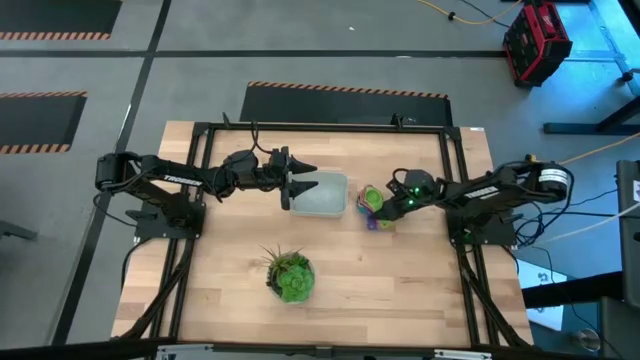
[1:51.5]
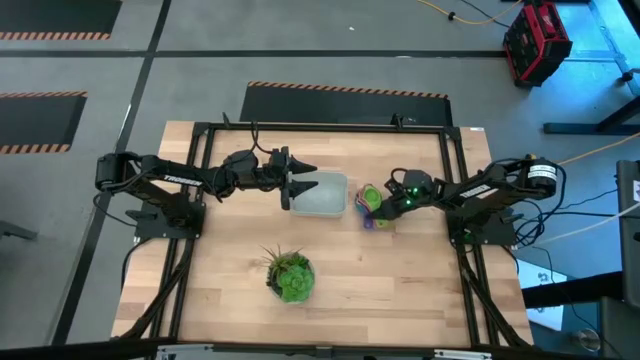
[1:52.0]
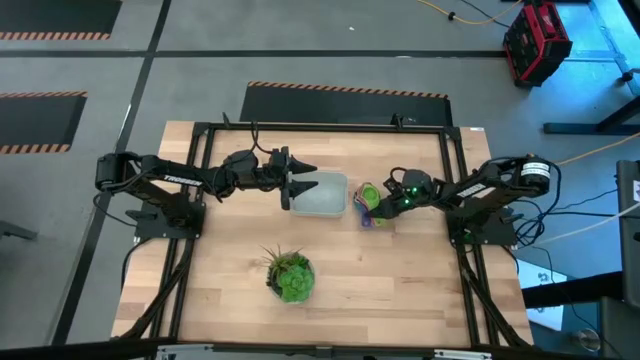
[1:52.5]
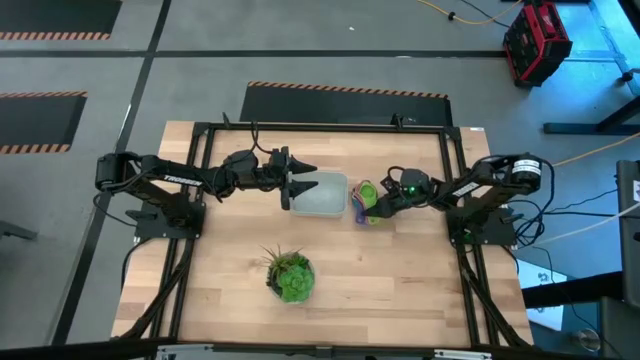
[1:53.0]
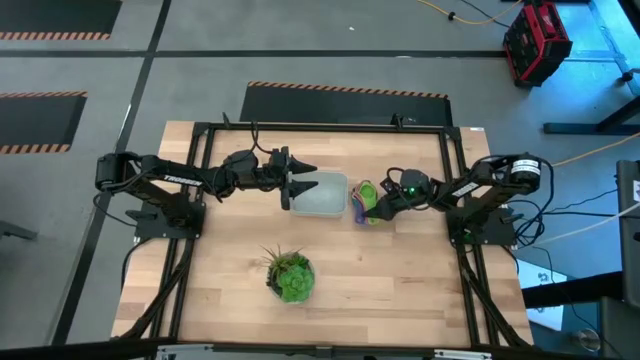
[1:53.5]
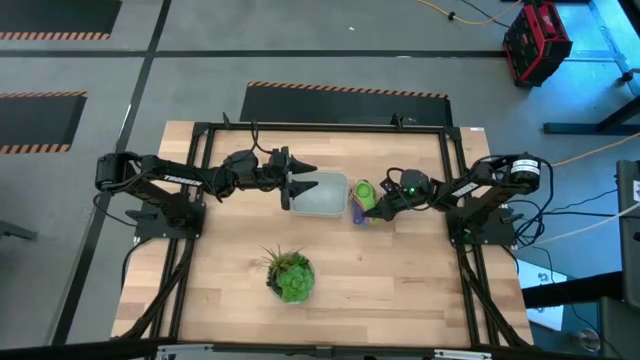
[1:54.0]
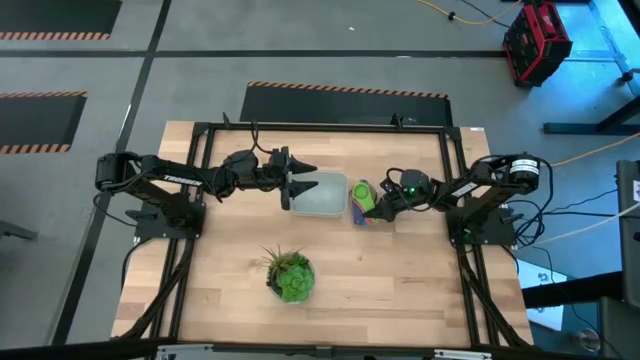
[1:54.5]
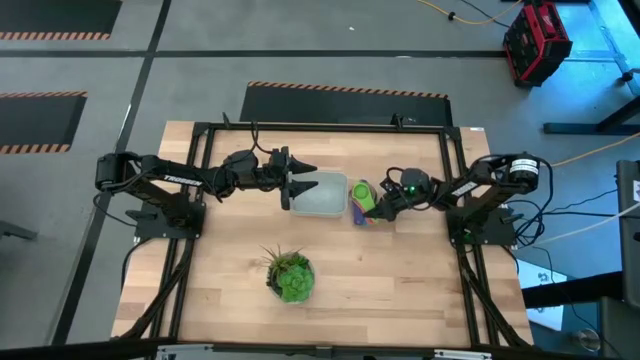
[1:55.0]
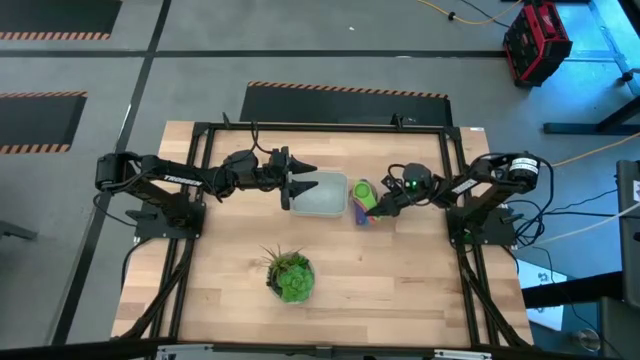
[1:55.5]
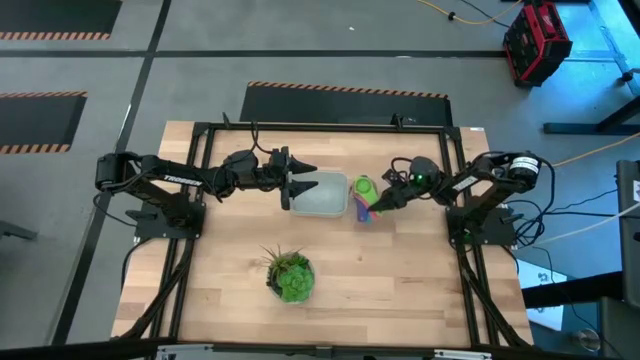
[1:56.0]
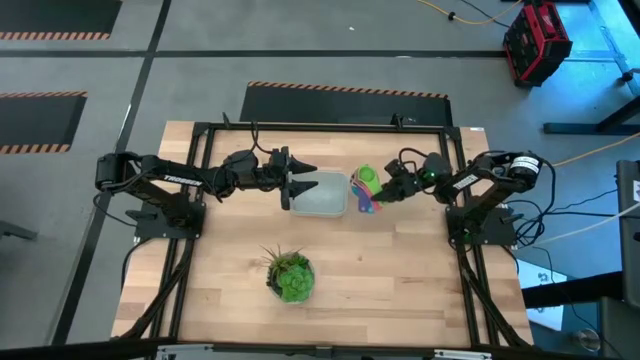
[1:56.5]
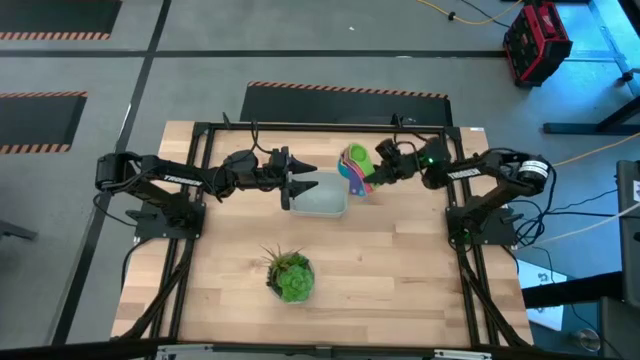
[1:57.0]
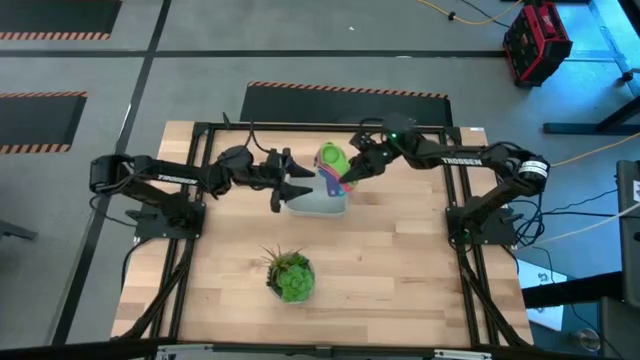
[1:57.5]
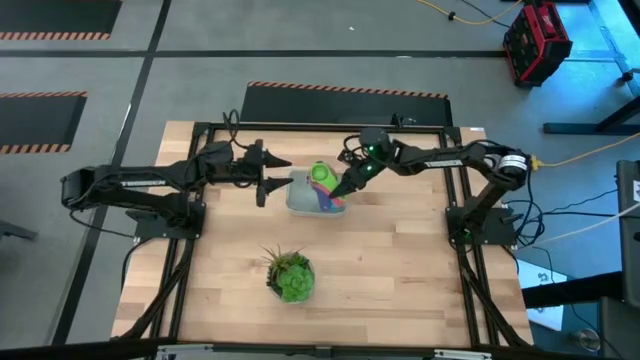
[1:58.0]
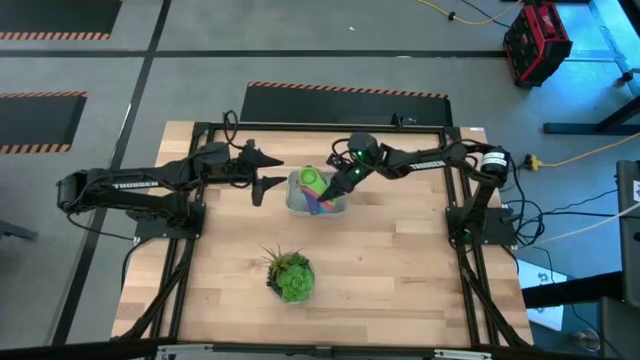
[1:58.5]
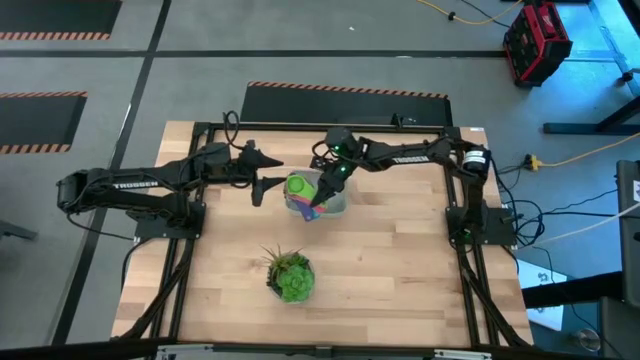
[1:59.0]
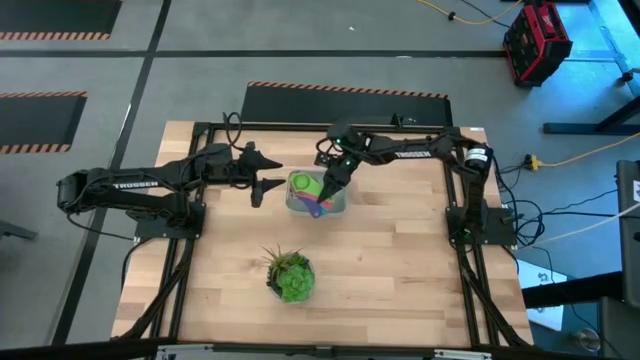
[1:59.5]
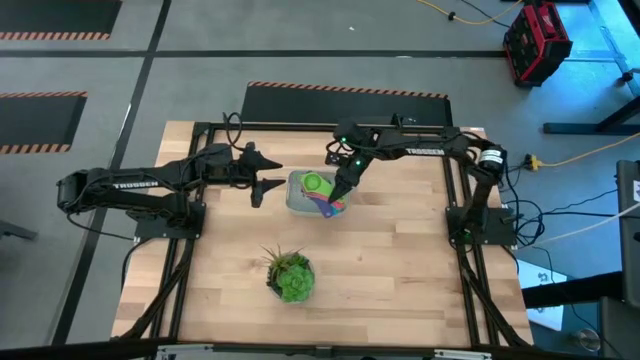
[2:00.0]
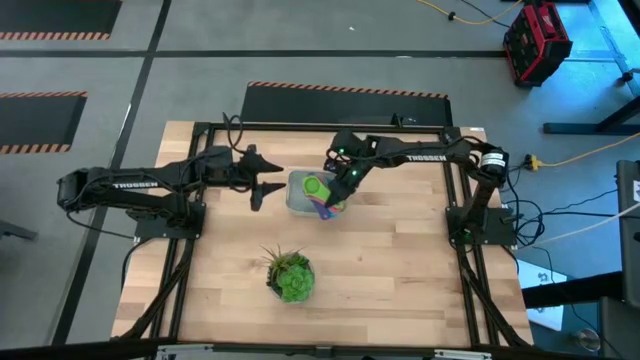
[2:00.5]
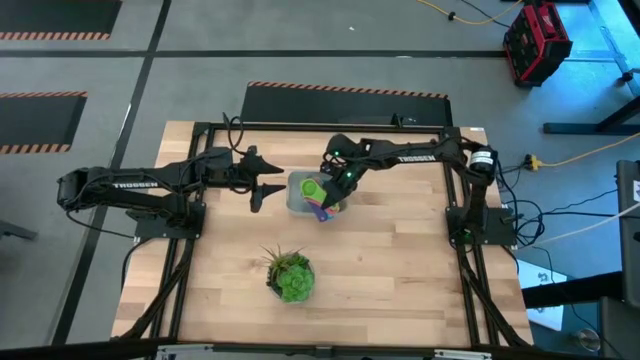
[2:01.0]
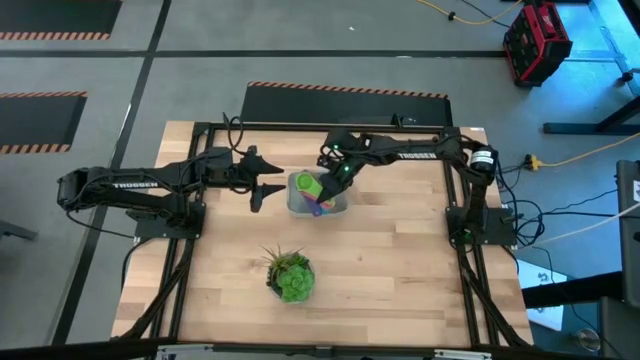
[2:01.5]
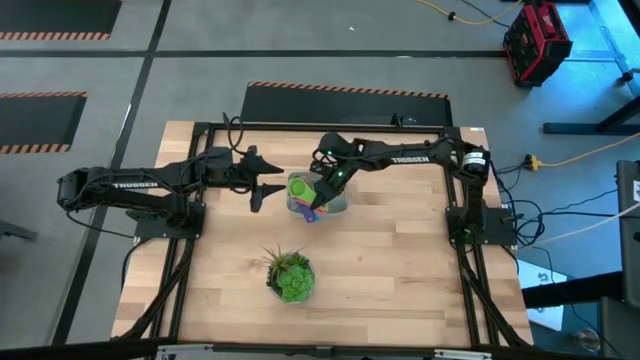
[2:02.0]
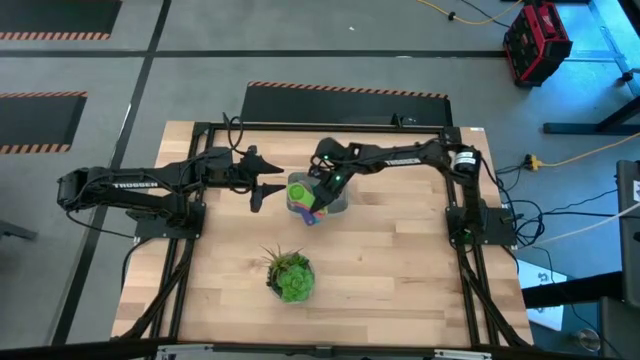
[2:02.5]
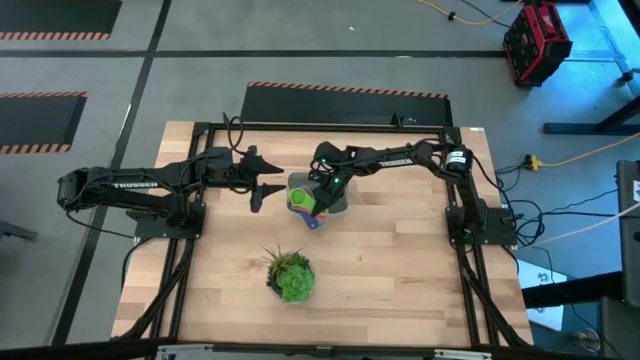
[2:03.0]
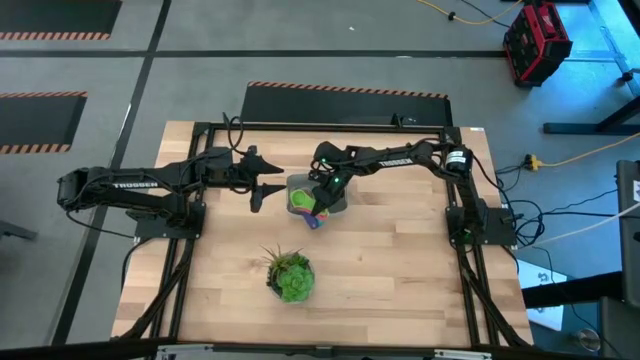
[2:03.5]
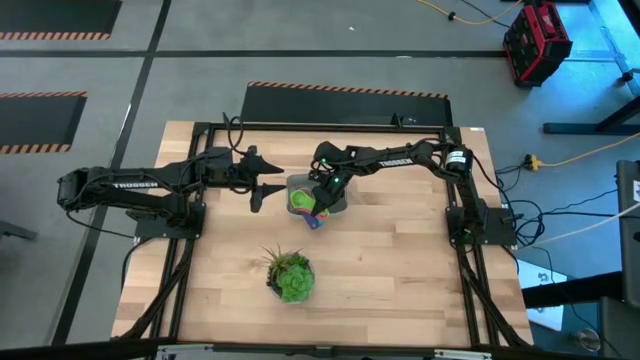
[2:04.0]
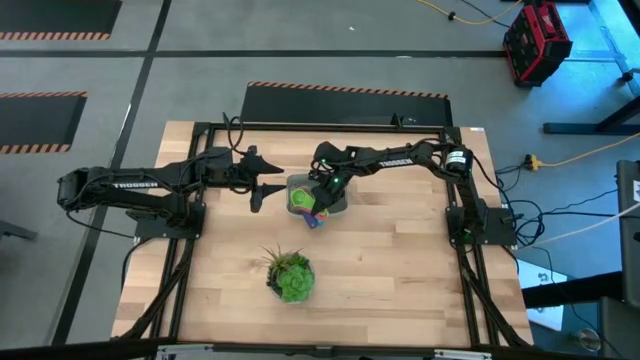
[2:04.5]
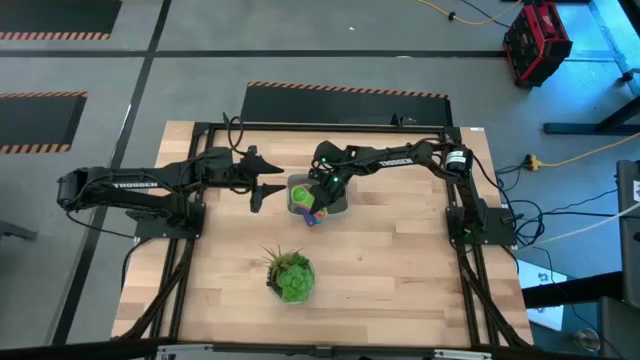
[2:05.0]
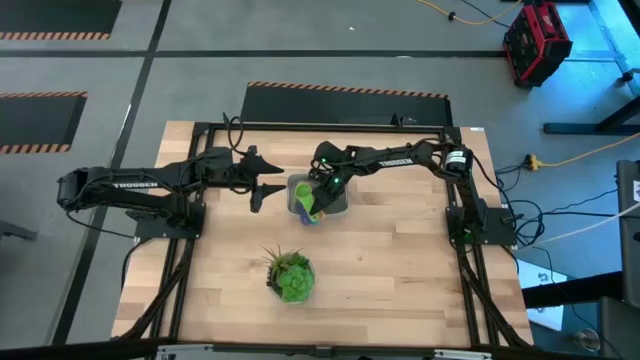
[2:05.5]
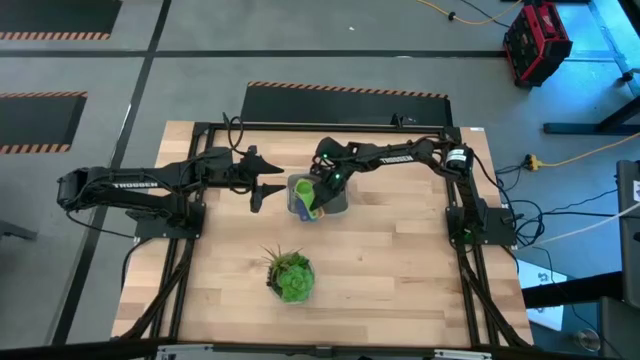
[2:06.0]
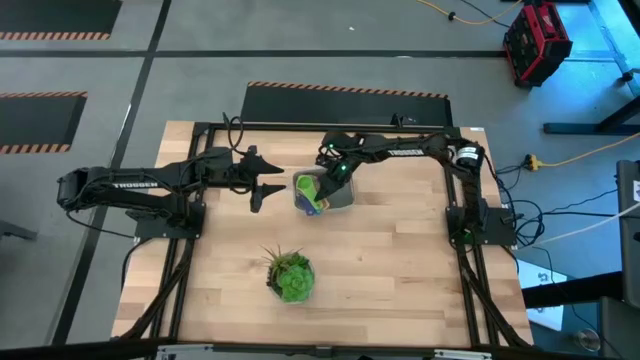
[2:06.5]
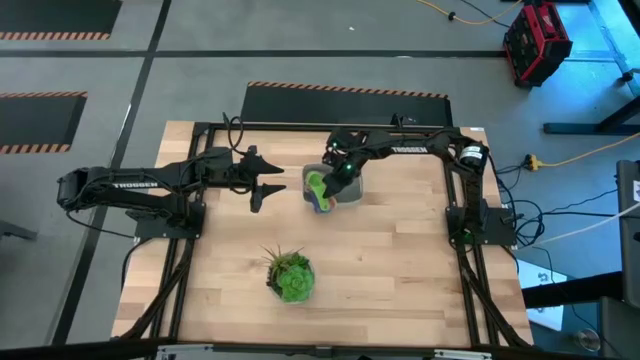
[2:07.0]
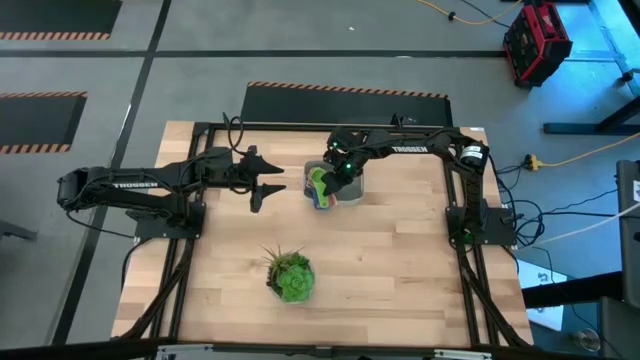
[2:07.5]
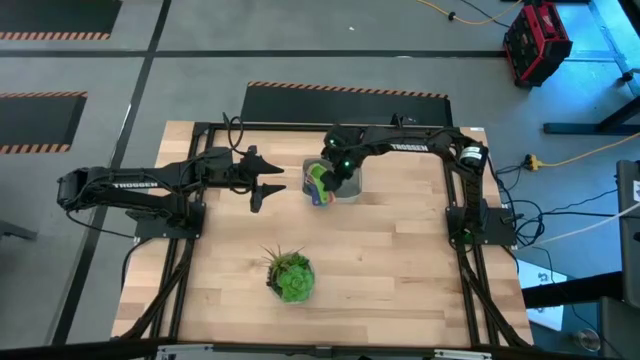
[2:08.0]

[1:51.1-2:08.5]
Task: Nest measuring cups in basket
Put the stacked measuring cups into the gray bin

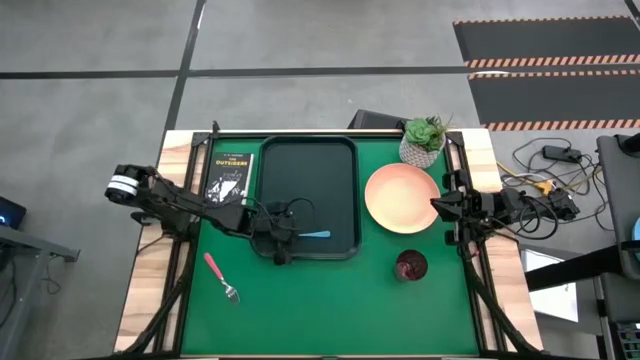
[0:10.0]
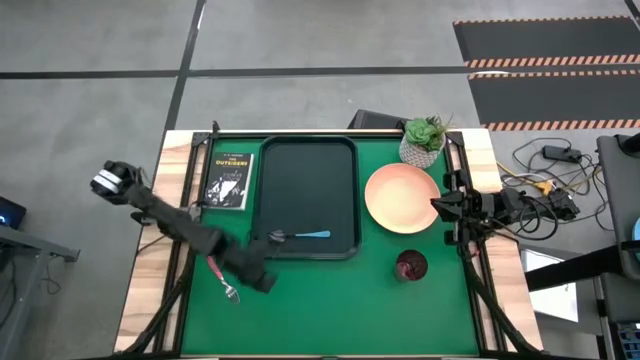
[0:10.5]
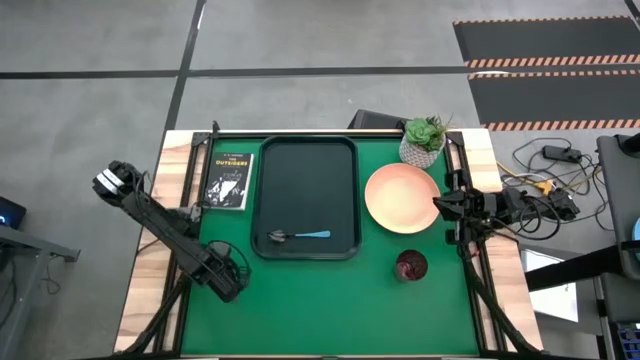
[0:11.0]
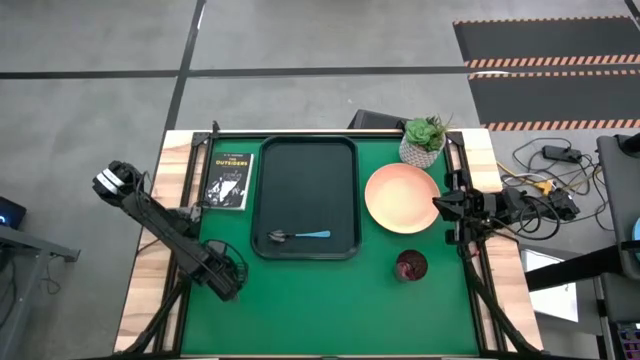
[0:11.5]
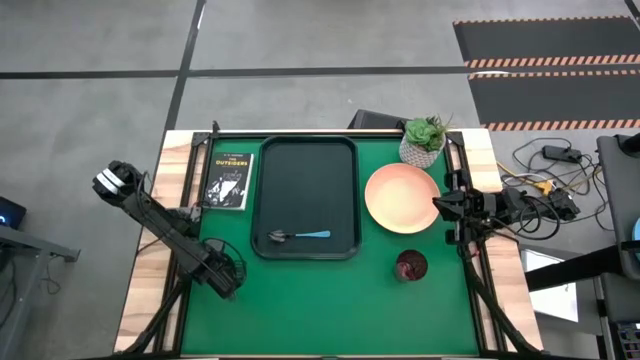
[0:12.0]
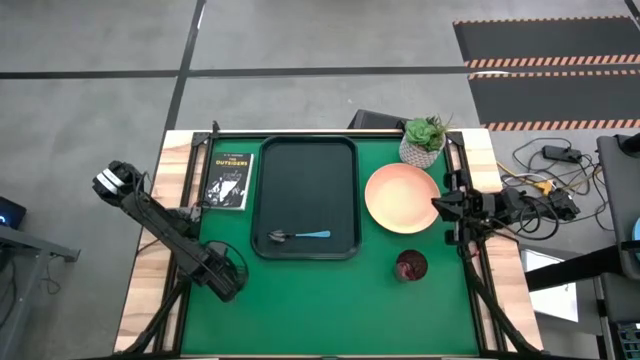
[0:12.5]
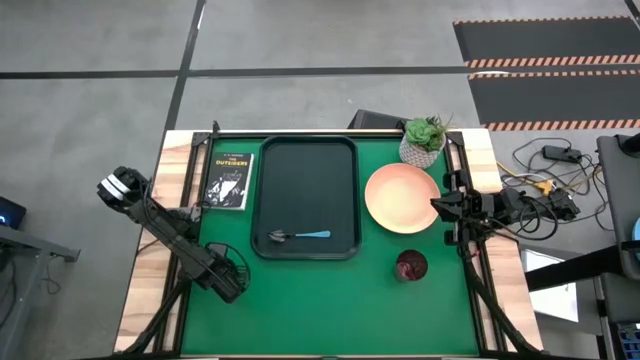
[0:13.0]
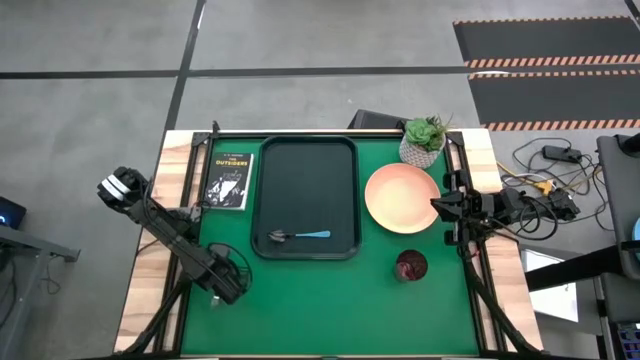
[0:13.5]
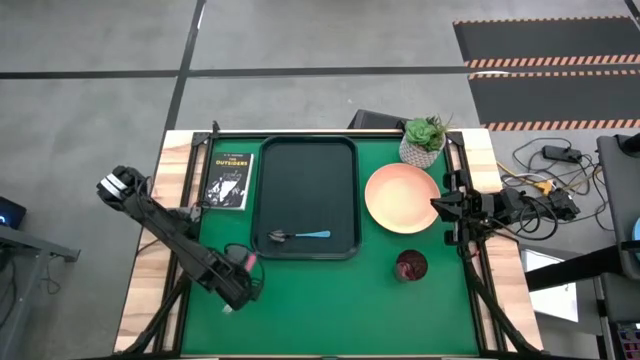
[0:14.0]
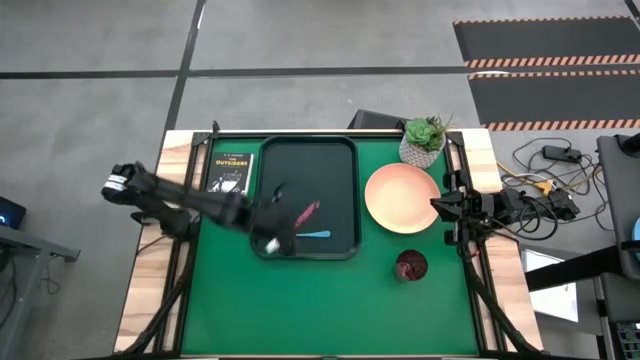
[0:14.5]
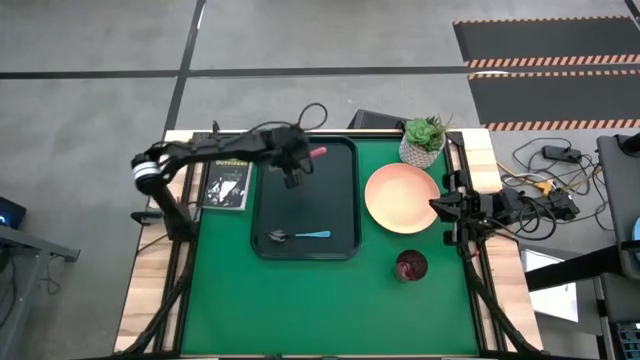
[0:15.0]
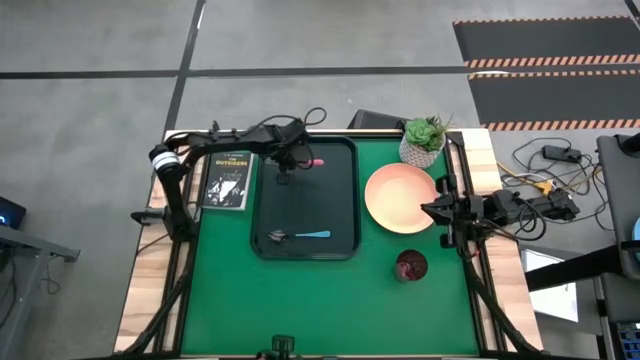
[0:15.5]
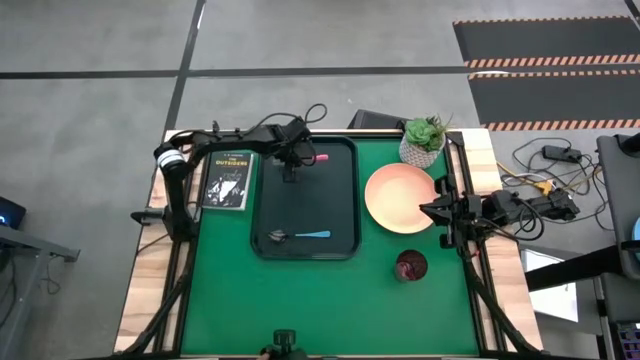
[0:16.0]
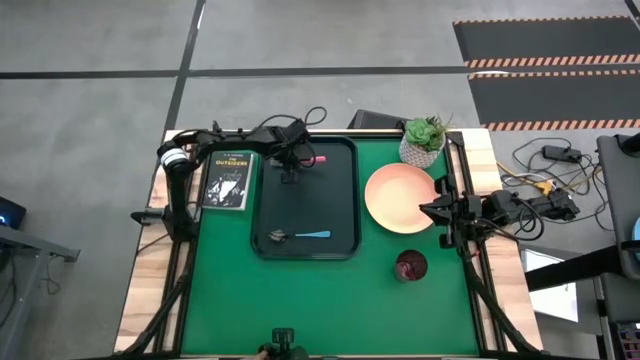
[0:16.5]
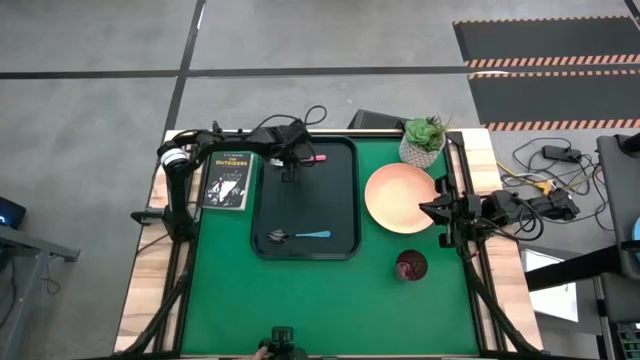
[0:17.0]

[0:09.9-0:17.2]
Task: Pick and place plate/cup/fork/spoon on tray
Put the red fork on the top of the black serving tray
